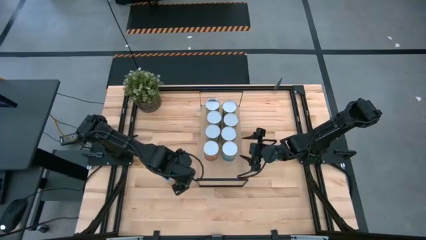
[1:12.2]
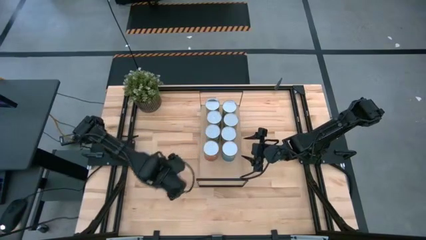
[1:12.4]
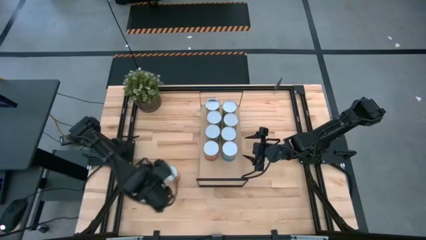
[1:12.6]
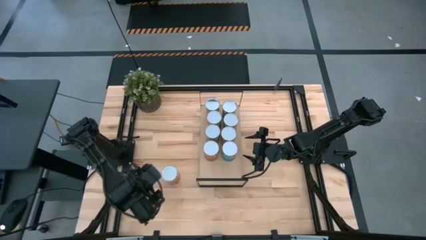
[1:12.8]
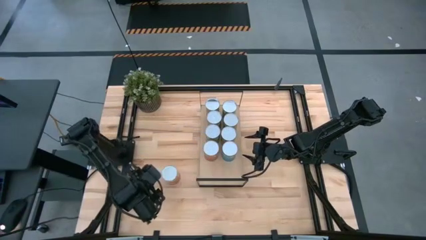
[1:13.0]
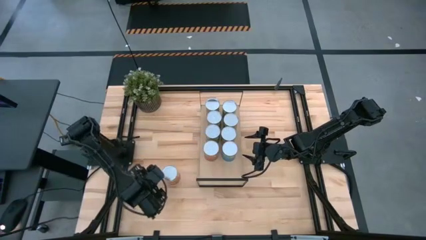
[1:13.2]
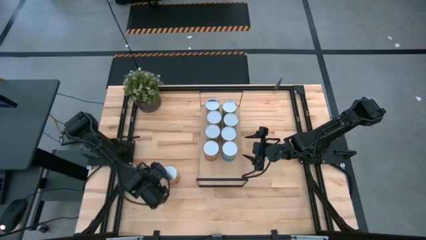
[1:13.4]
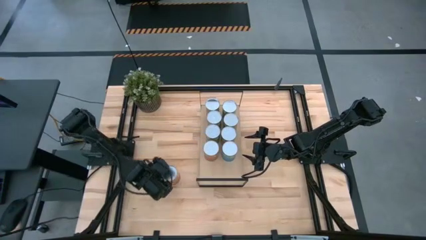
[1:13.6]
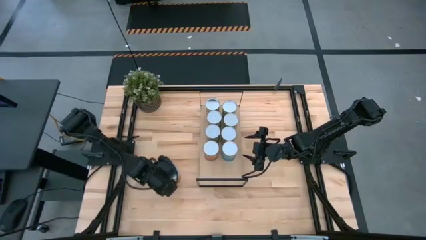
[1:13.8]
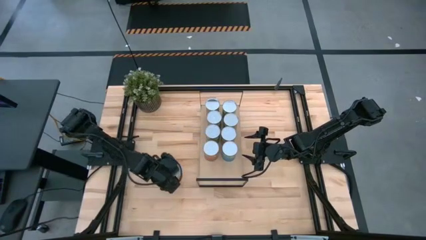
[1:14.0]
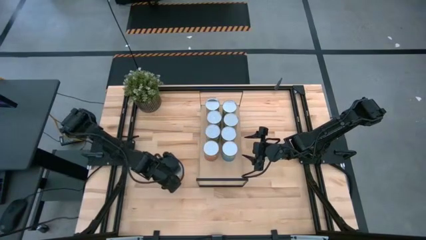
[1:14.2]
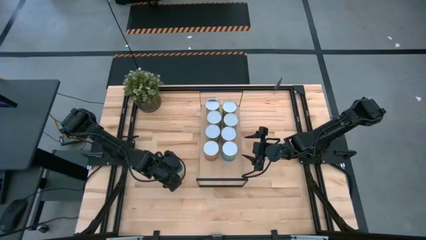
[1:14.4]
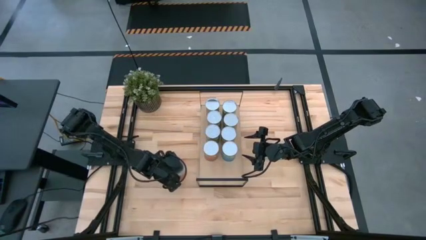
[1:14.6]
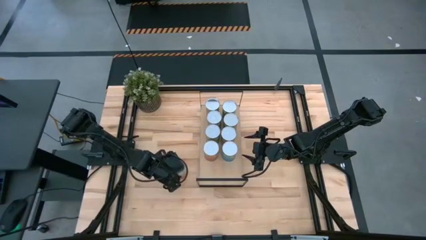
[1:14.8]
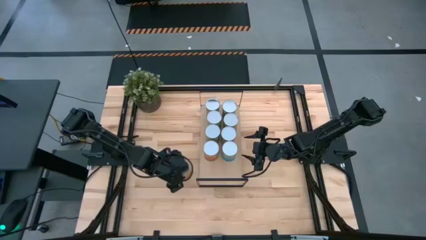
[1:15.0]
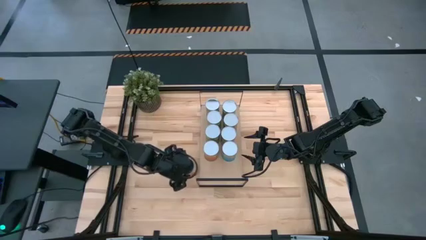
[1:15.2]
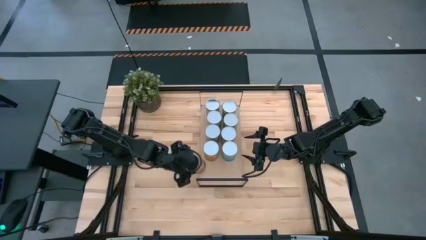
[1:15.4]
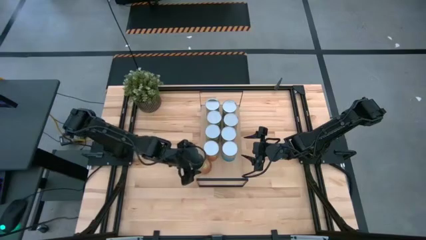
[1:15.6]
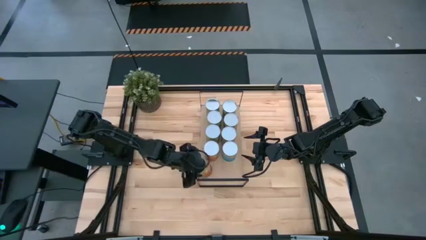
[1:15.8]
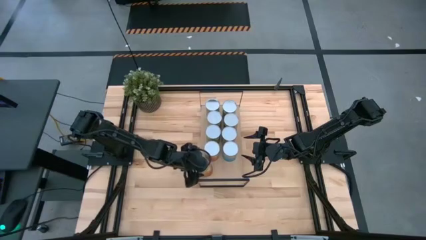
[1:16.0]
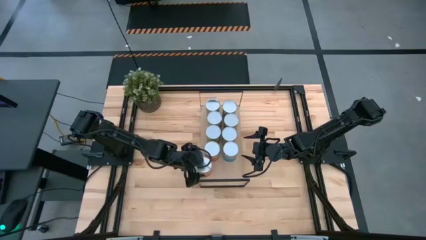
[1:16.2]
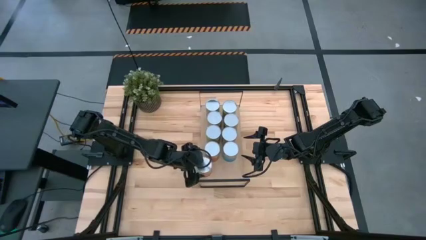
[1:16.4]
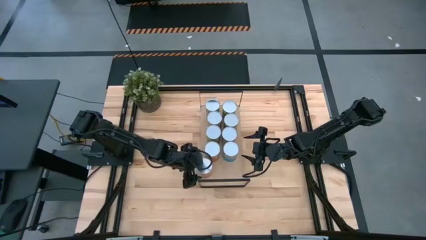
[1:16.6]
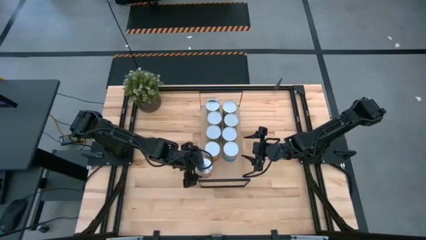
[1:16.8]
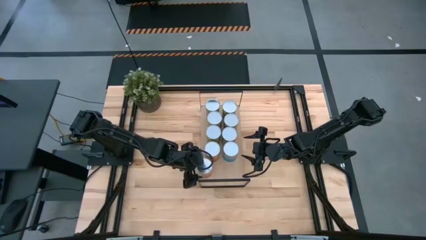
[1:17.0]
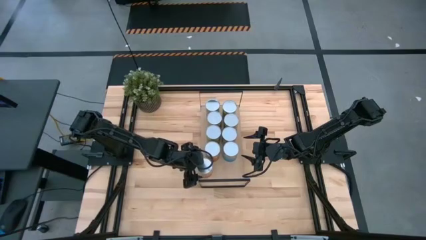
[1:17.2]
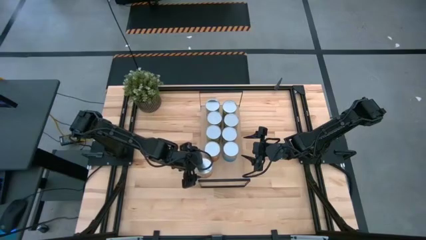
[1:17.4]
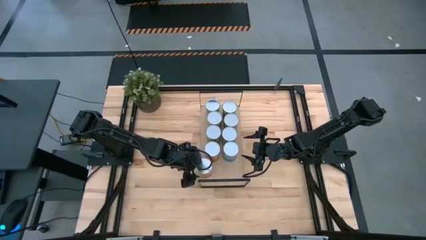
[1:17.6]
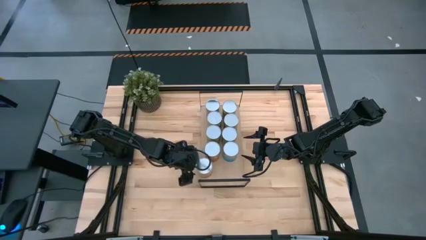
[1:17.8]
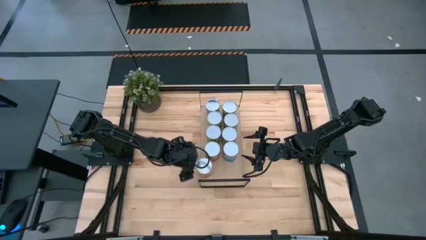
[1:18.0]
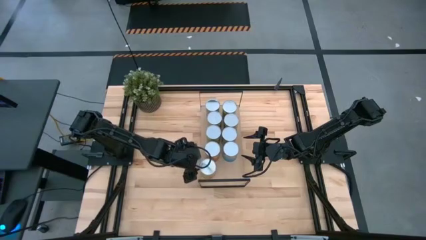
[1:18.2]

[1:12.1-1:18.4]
Task: Pick and place cans onto a shelf
Put the canned corn on the shelf

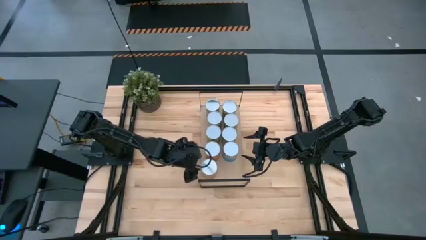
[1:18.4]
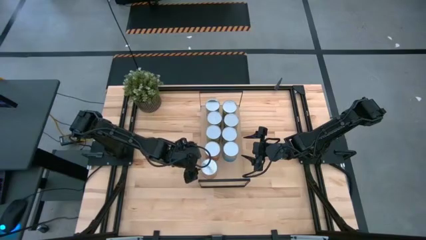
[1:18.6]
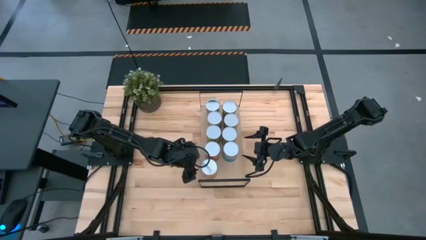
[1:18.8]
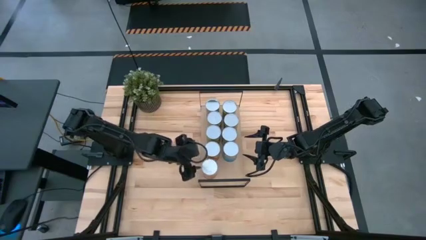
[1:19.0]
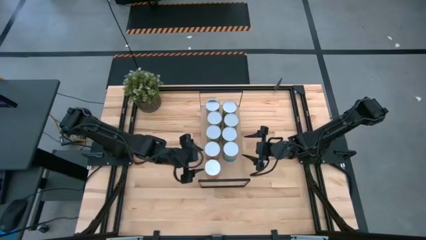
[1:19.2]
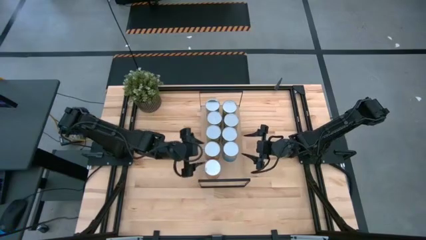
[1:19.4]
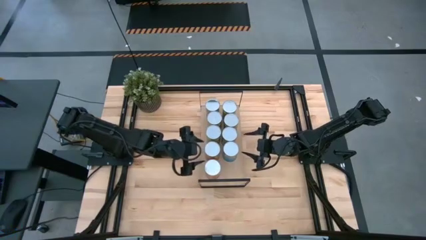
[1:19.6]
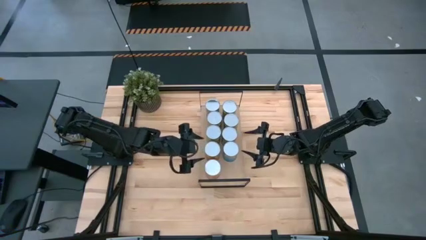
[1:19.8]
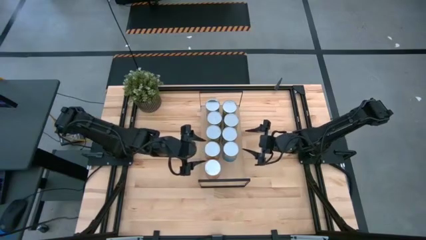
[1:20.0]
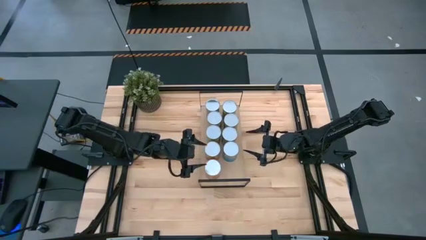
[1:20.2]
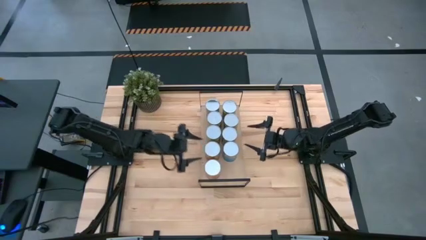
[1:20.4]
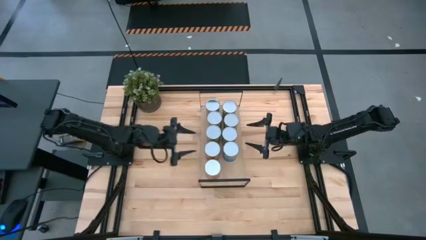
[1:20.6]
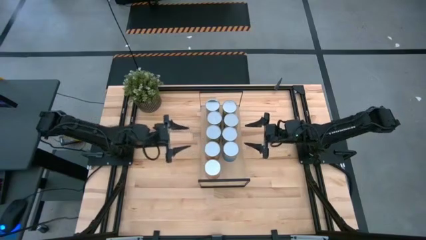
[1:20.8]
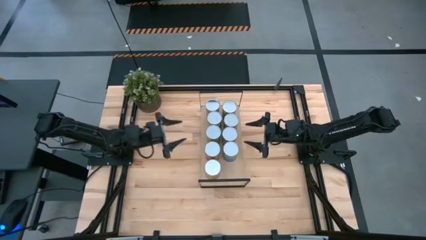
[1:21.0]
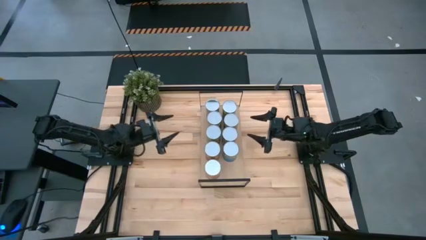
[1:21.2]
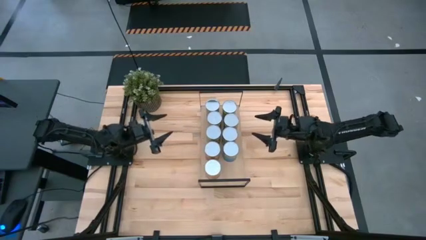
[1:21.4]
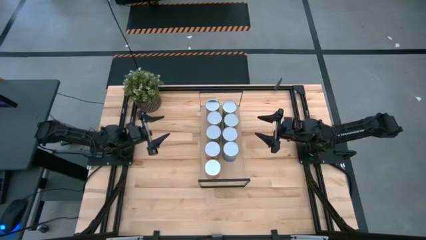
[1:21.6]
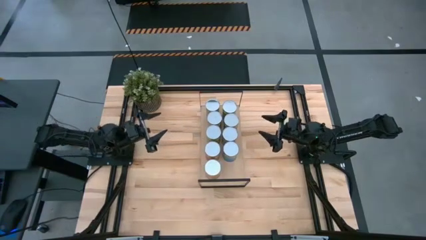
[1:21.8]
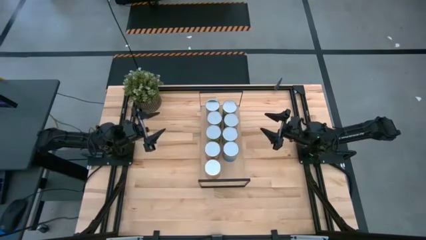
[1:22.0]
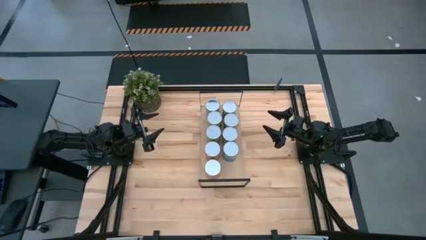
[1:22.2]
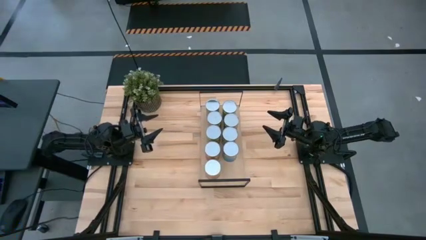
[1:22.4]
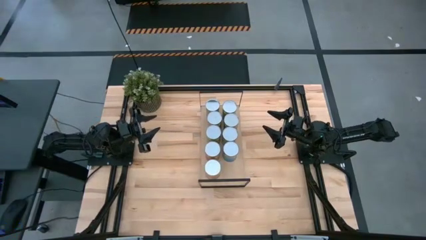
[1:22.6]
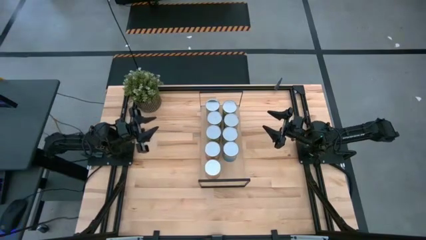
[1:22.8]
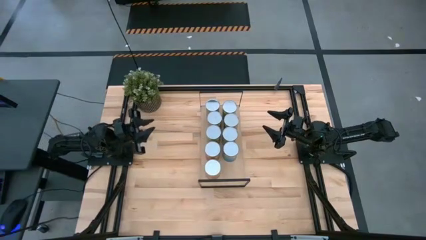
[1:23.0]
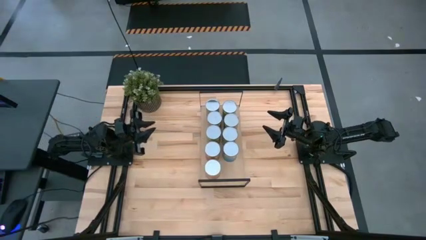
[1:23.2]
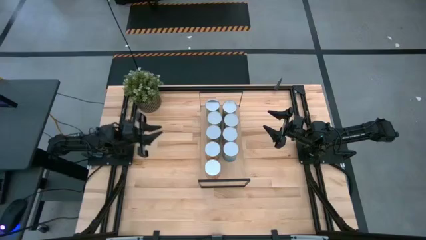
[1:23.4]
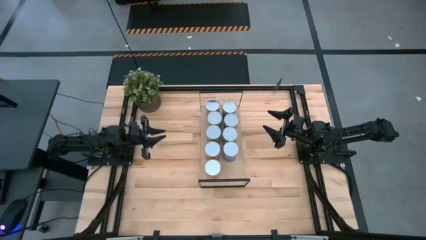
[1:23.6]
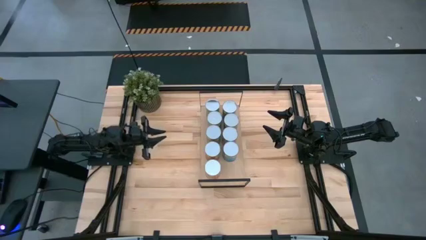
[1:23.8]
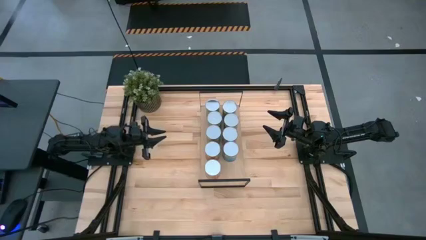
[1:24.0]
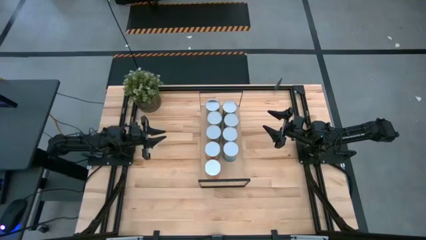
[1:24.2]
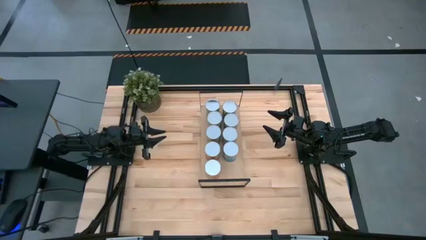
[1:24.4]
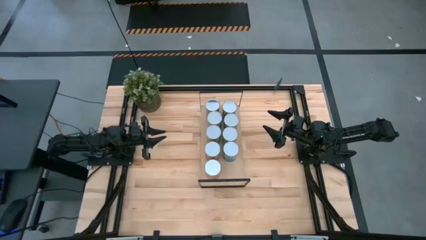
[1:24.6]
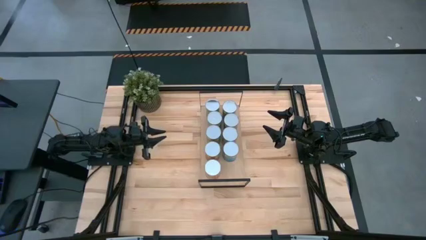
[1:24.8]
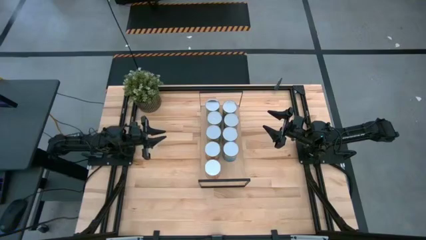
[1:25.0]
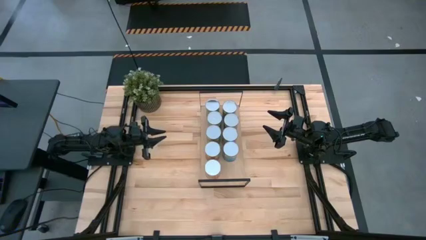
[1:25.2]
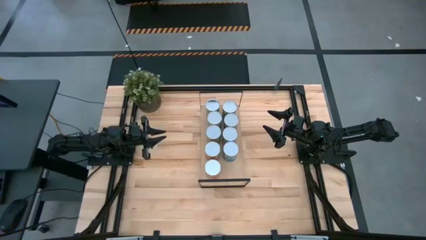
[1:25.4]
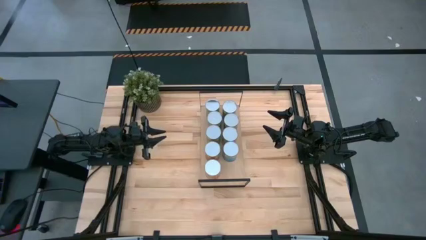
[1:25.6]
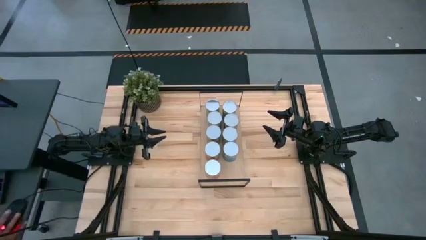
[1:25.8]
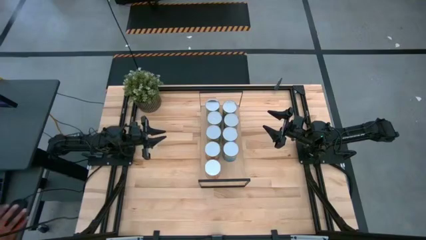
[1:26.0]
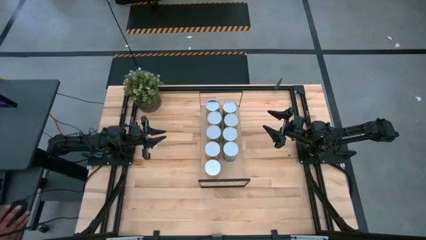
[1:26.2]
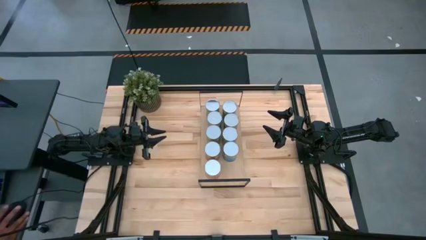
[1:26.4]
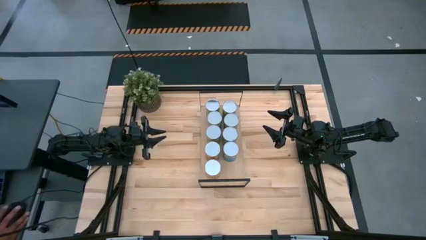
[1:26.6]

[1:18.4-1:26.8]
Return to Home Position

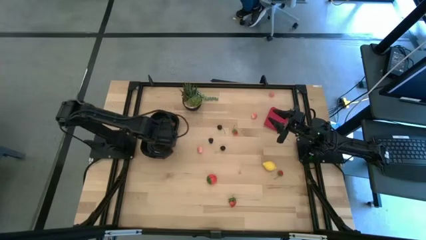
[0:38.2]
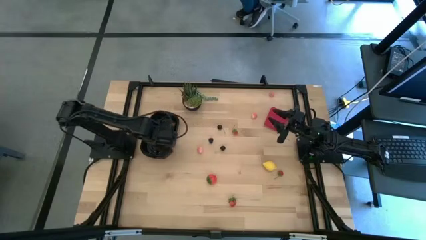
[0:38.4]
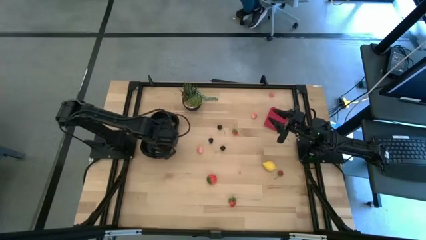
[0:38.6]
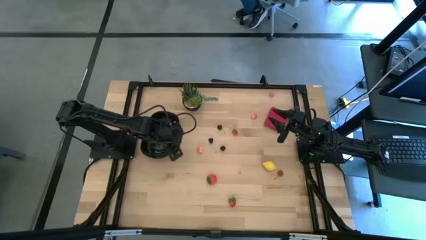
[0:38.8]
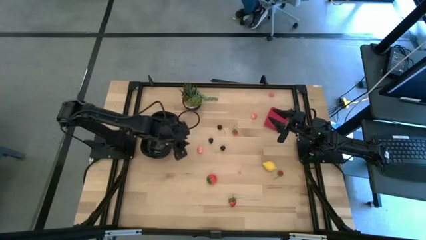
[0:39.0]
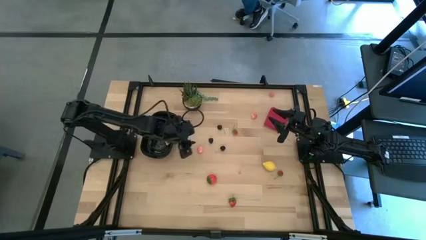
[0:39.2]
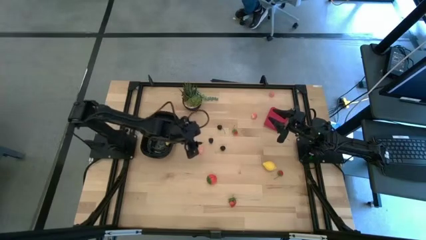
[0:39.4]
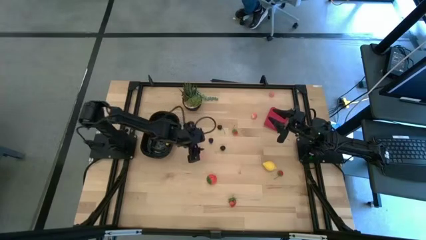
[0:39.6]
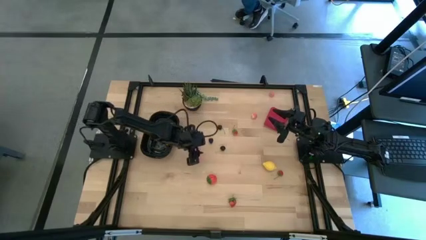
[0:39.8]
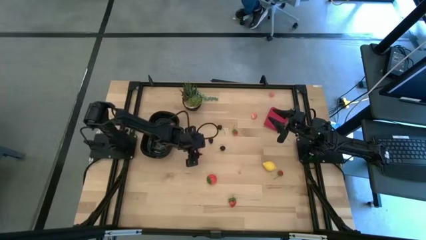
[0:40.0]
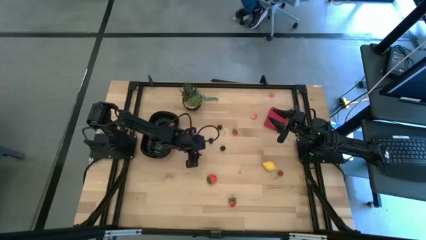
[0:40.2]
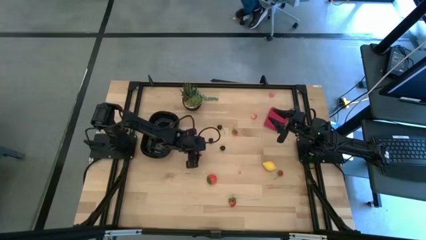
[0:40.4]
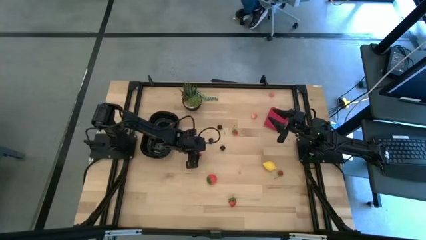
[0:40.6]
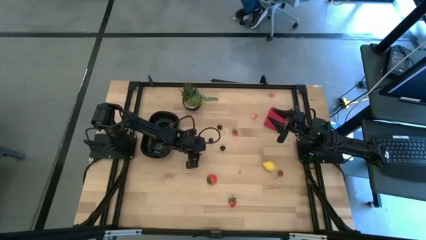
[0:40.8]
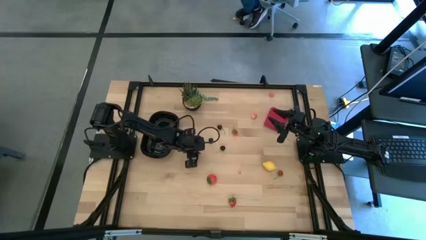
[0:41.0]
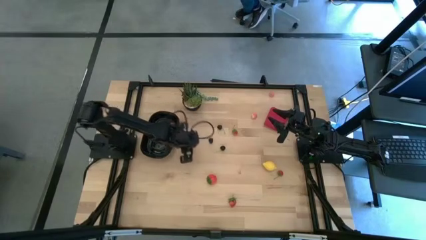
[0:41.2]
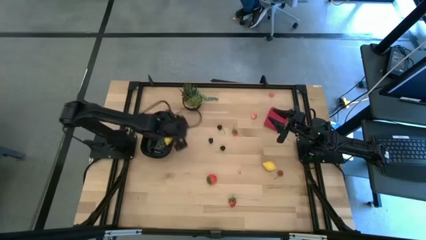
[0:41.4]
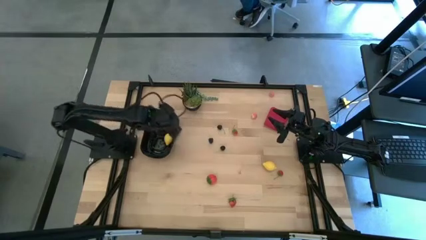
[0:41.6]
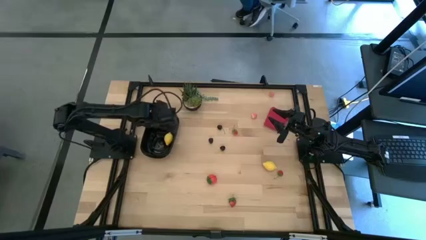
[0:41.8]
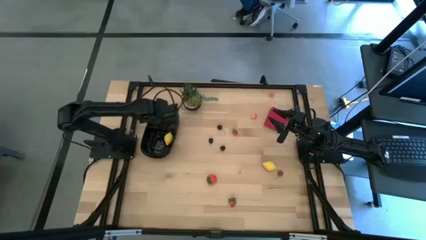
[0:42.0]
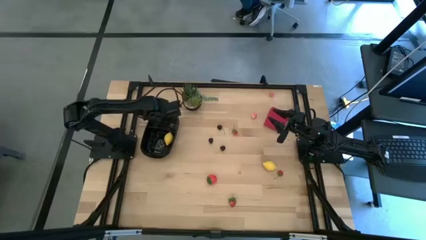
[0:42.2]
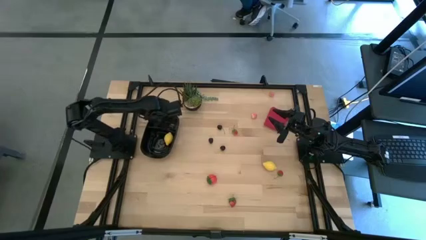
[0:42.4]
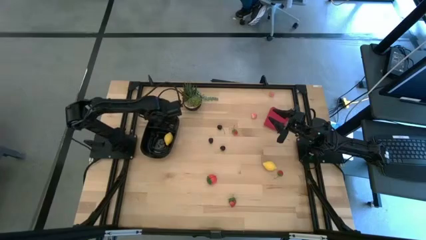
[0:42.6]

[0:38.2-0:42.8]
Task: Pick and placing Produce into tupperware
Put the pink peach into the black container
